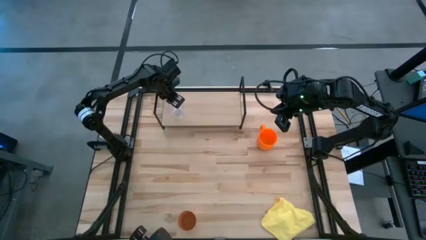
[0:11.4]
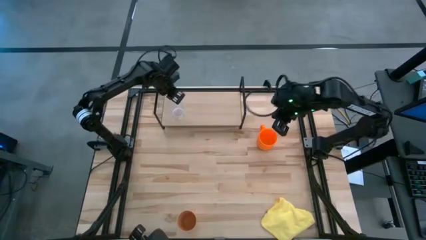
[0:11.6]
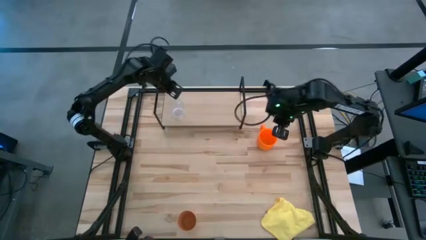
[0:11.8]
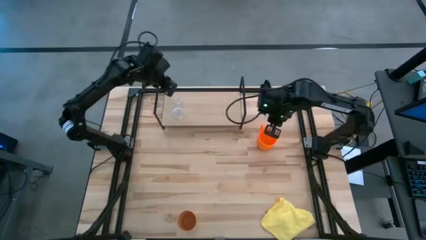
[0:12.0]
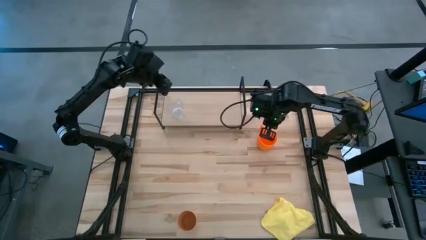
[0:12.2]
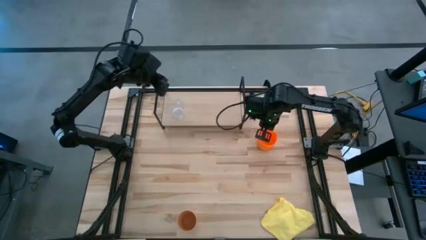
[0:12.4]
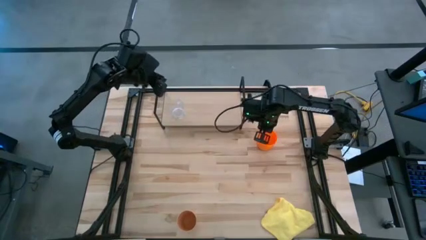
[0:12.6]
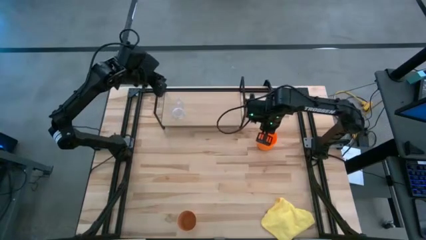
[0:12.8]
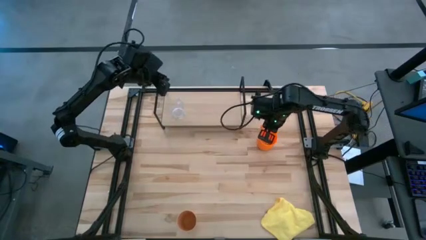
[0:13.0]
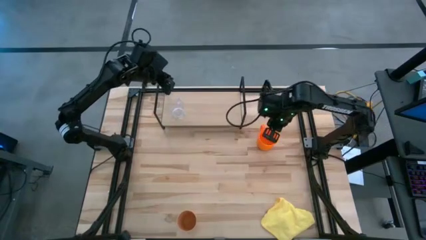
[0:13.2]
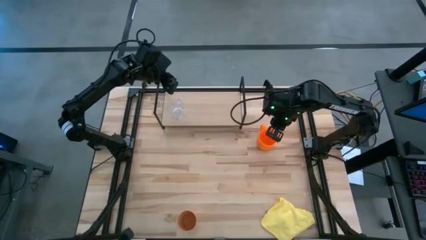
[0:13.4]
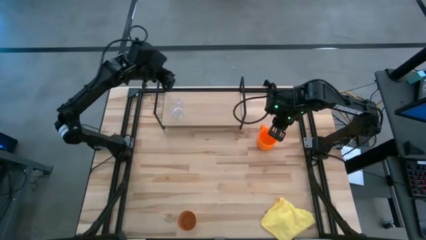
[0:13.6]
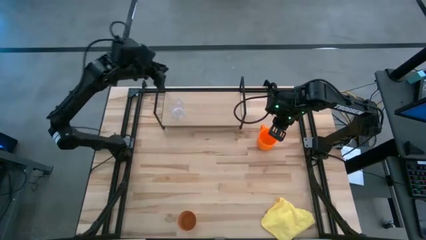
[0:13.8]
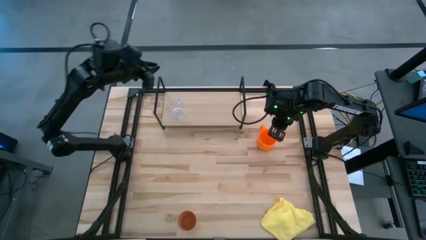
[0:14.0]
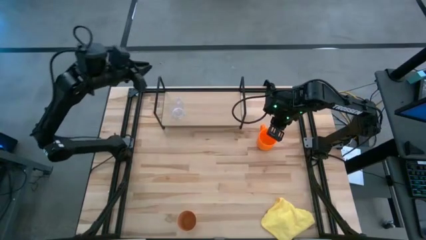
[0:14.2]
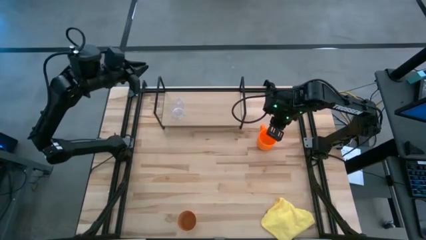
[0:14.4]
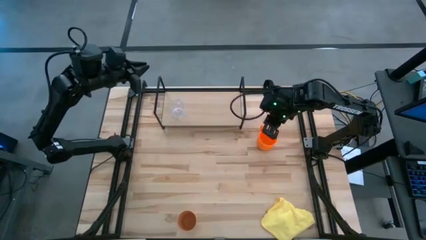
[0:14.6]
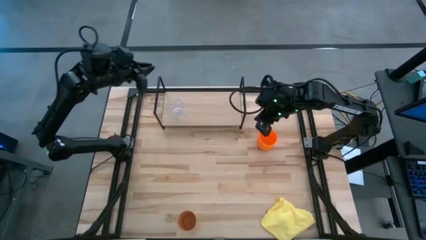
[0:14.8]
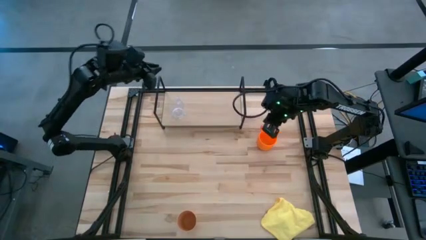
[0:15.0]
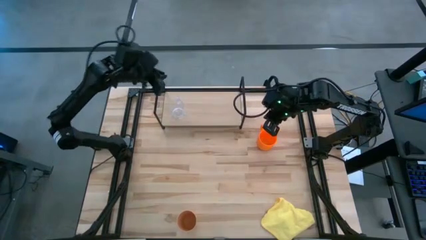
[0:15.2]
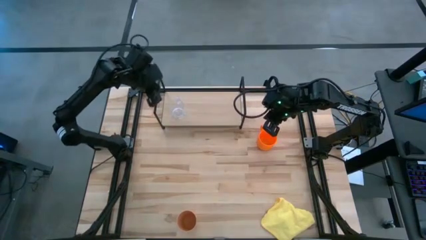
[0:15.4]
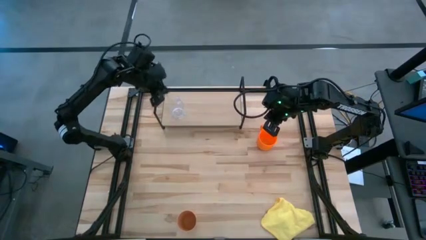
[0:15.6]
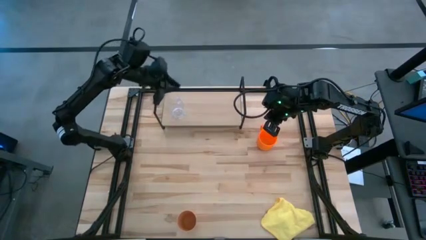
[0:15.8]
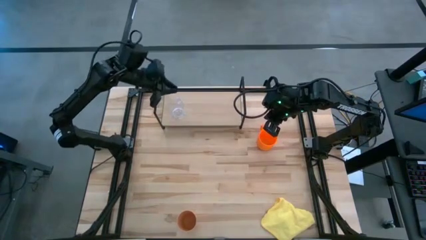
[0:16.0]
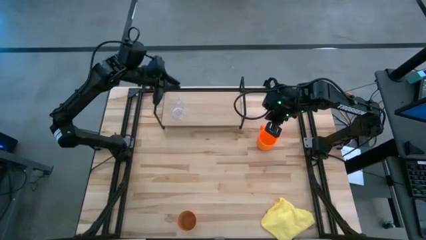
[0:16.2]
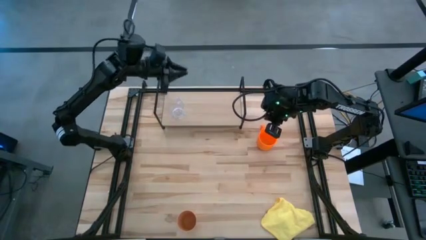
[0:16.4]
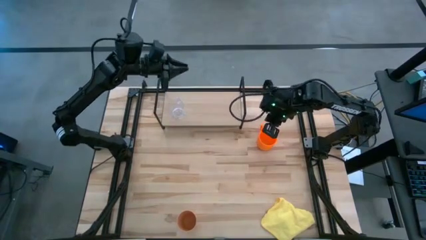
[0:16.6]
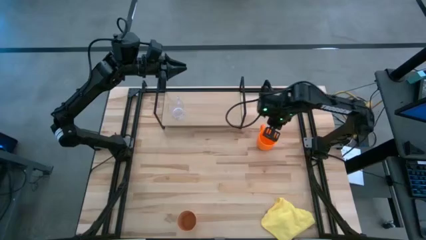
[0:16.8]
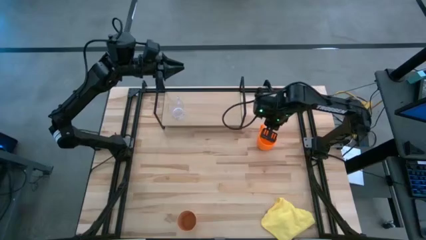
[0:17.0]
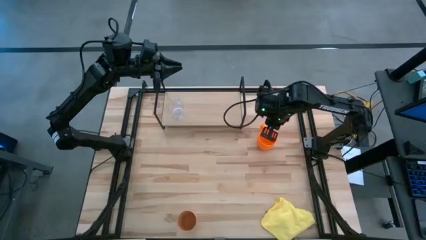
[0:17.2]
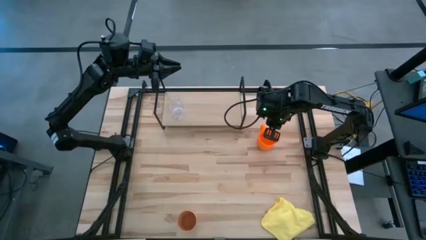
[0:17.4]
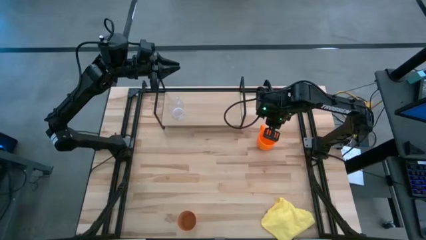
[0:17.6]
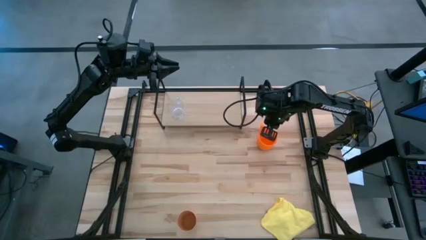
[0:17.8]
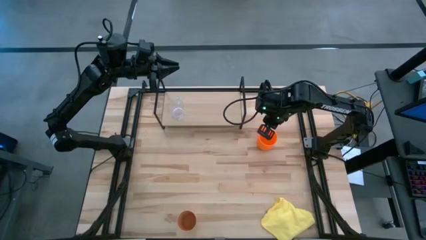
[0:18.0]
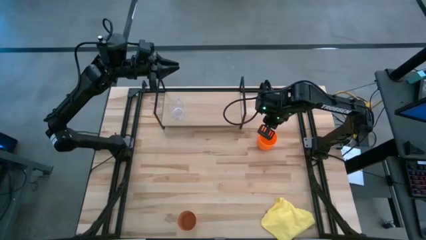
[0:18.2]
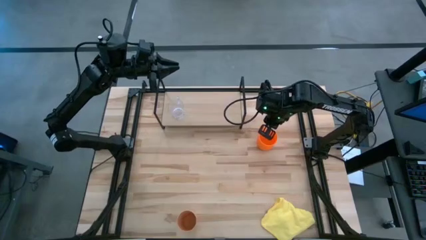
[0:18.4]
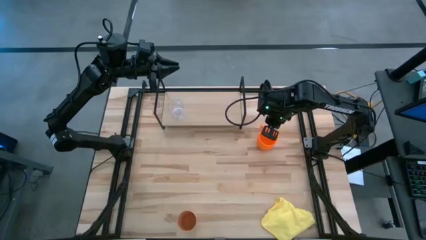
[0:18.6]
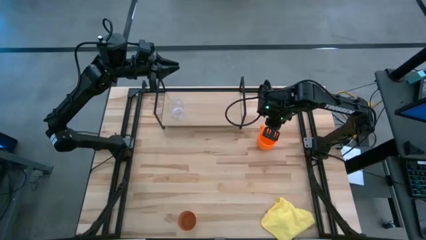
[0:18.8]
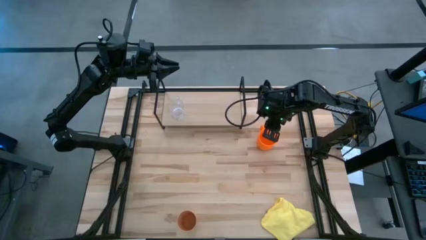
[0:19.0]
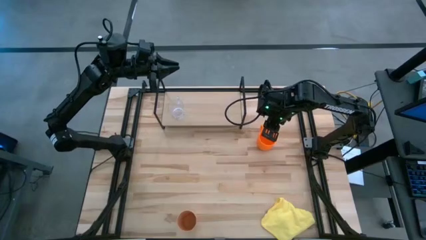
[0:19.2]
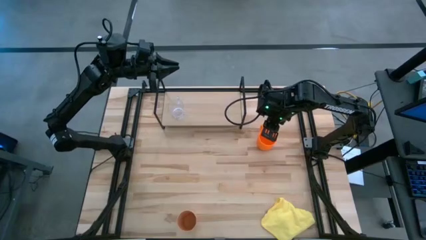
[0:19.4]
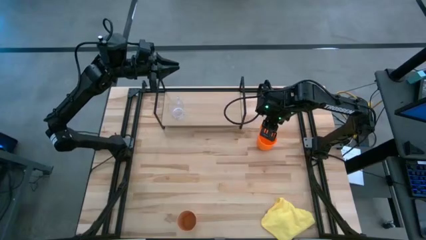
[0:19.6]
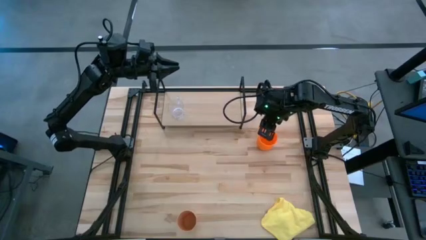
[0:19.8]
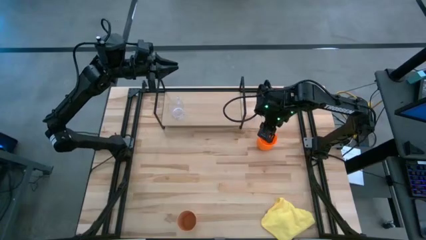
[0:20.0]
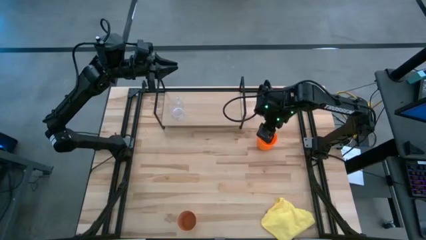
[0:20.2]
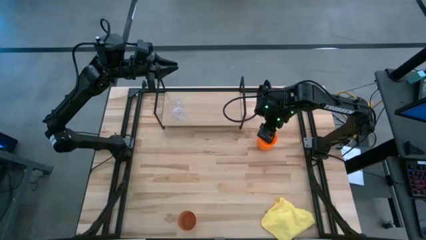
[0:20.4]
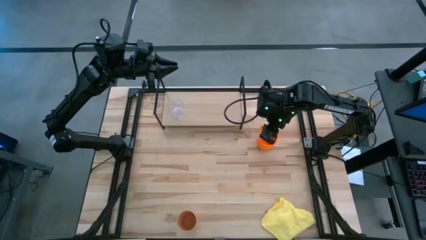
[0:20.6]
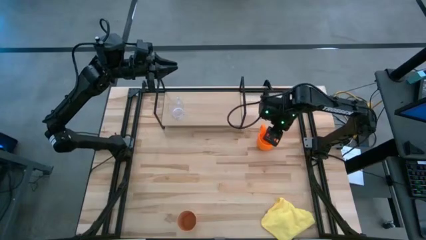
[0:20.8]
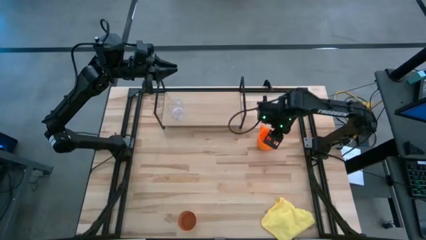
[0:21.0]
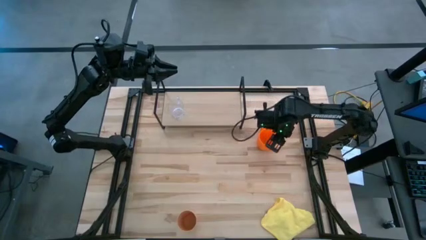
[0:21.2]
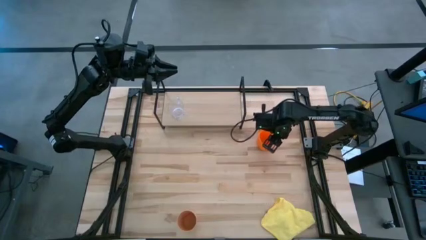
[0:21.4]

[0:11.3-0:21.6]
Task: Stack small to large cups/mugs on shelf
Put the orange mug on the shelf
